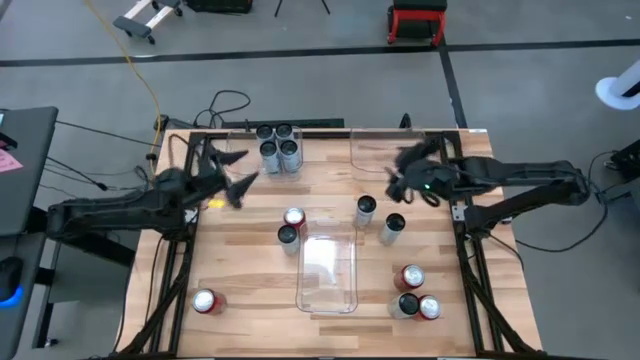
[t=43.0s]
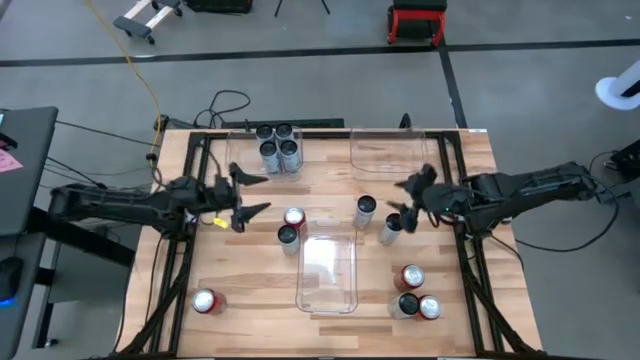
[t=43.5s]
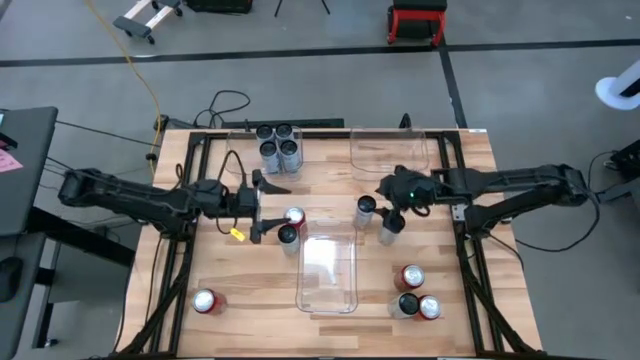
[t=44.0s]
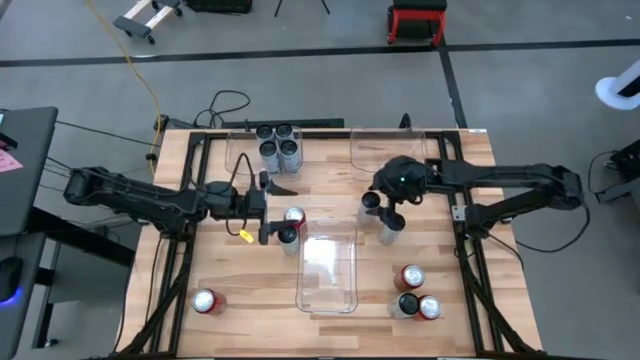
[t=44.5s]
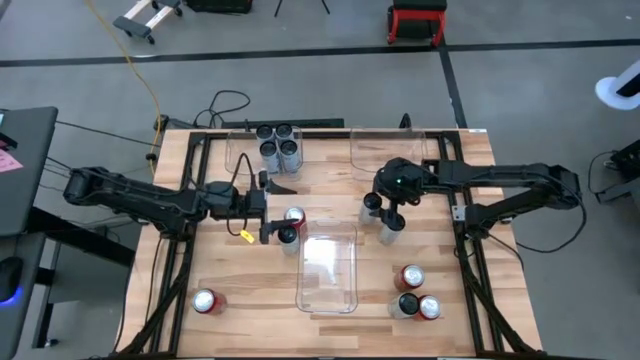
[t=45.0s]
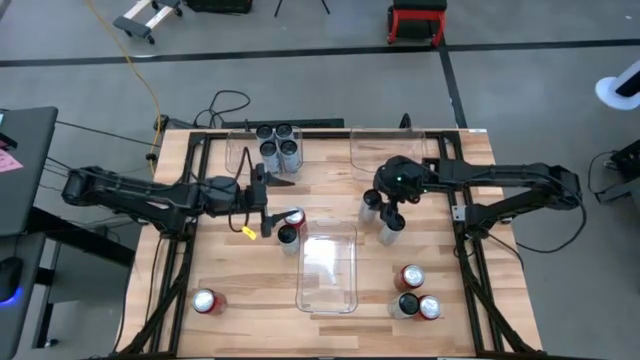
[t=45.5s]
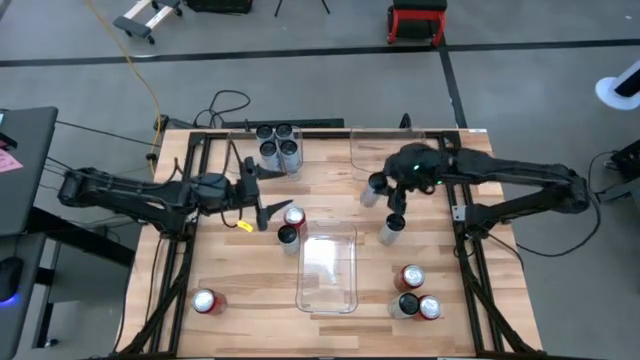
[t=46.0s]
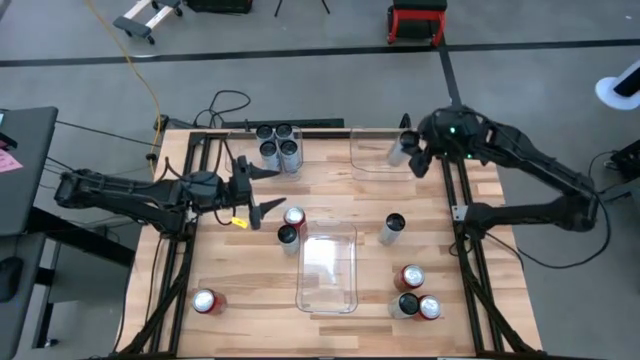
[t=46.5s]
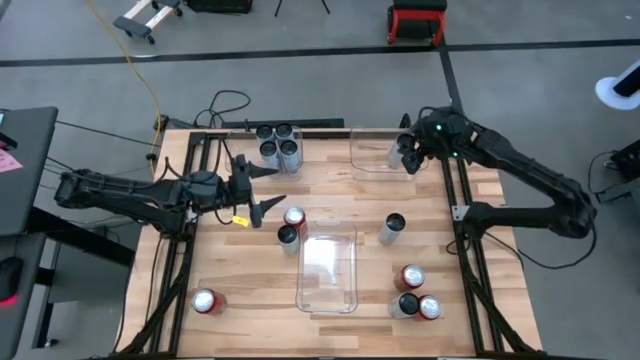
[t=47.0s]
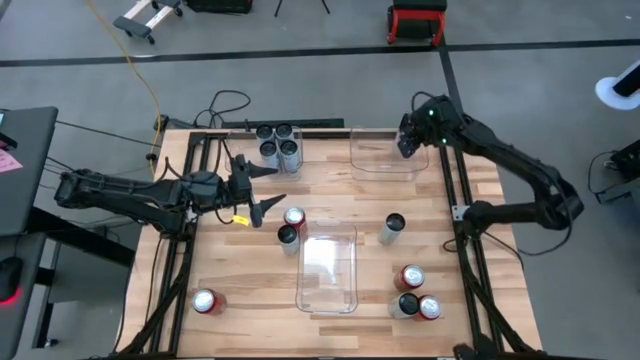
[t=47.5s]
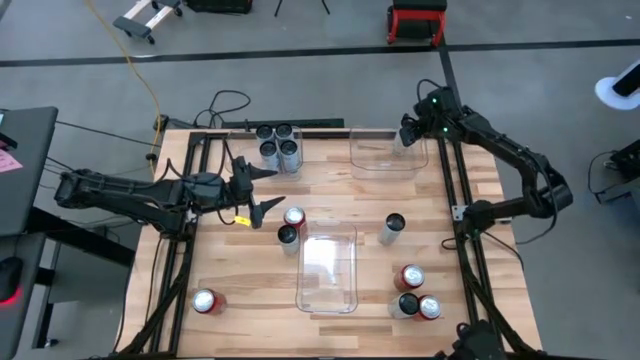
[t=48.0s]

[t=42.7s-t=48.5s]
Task: Sort soda cans
Put the white-yellow soda can into the top right transparent bin

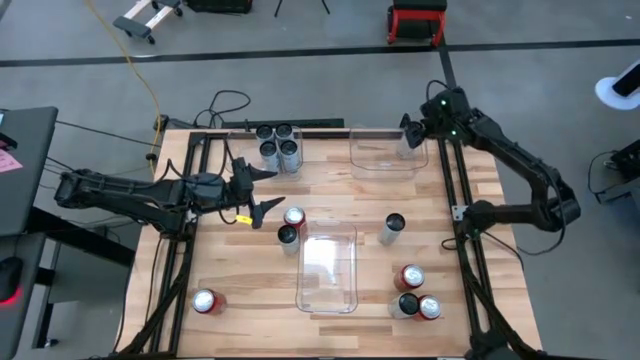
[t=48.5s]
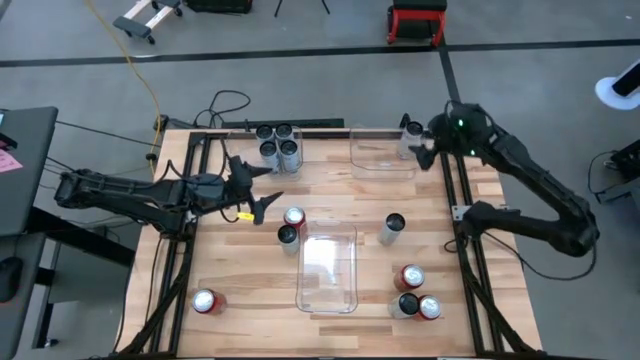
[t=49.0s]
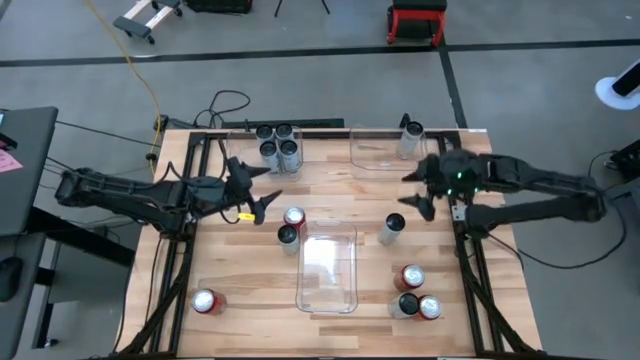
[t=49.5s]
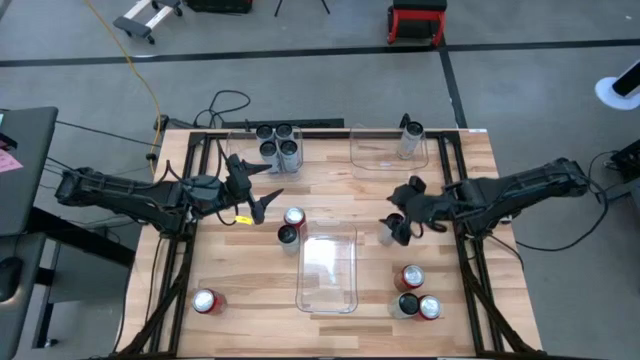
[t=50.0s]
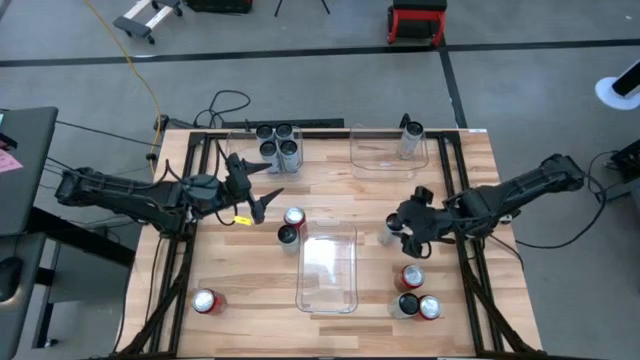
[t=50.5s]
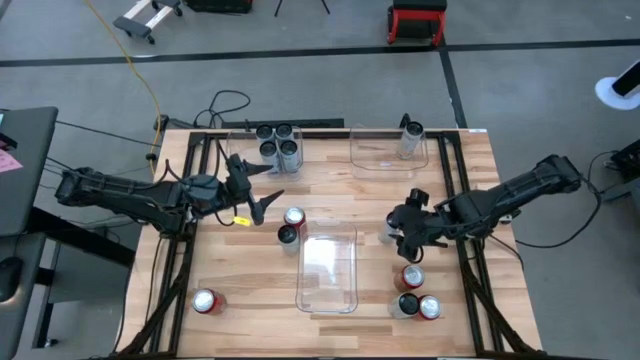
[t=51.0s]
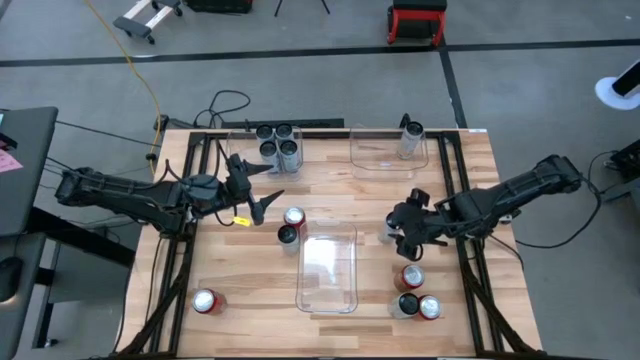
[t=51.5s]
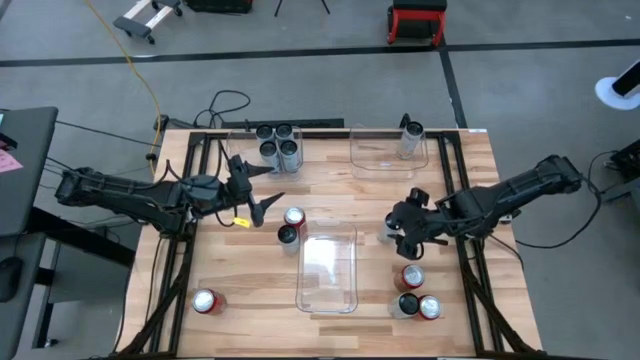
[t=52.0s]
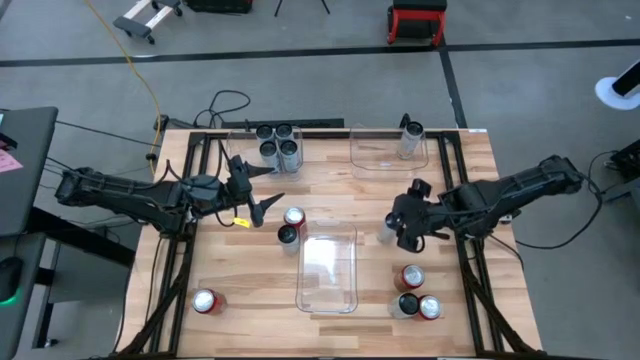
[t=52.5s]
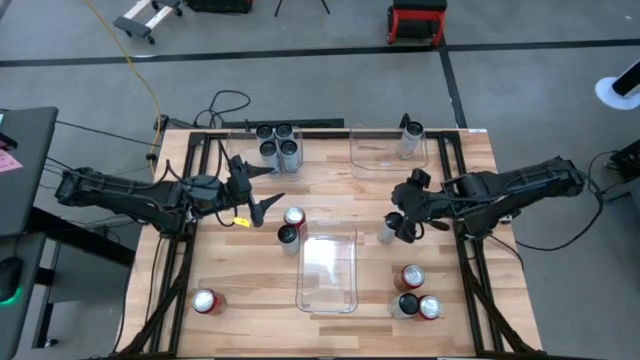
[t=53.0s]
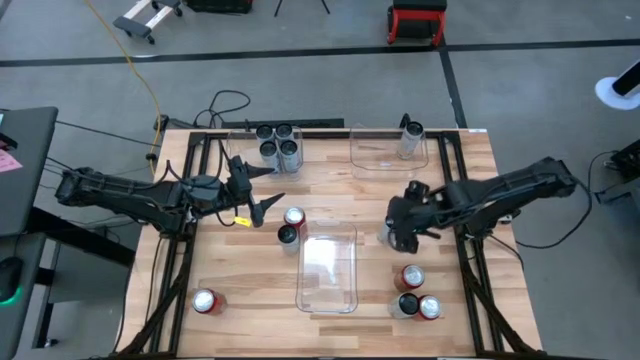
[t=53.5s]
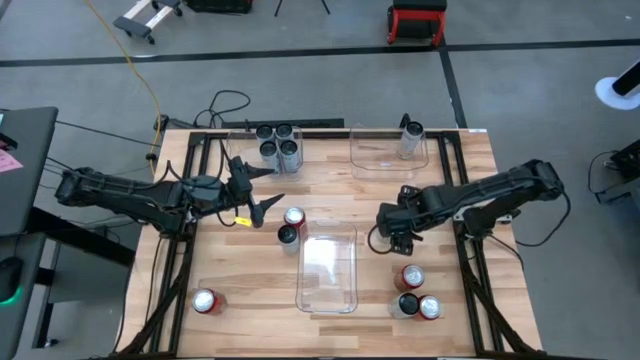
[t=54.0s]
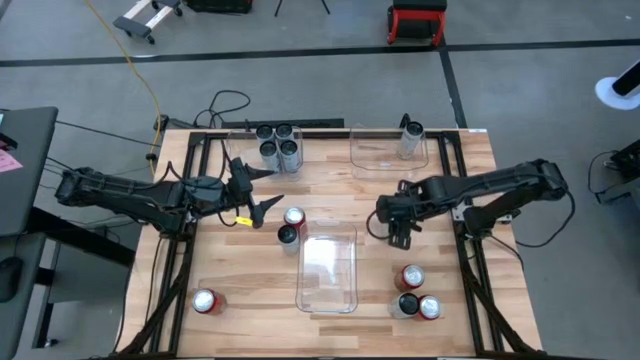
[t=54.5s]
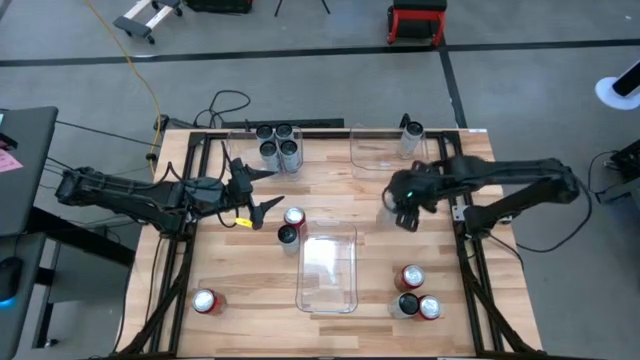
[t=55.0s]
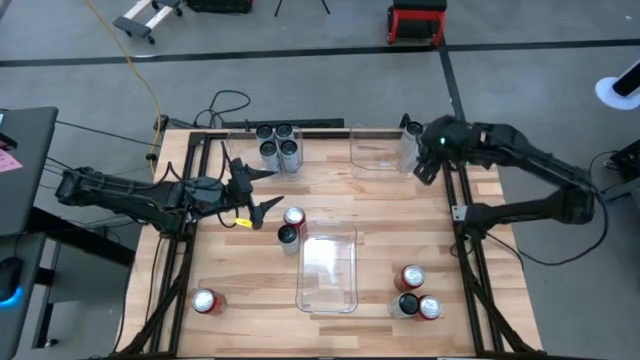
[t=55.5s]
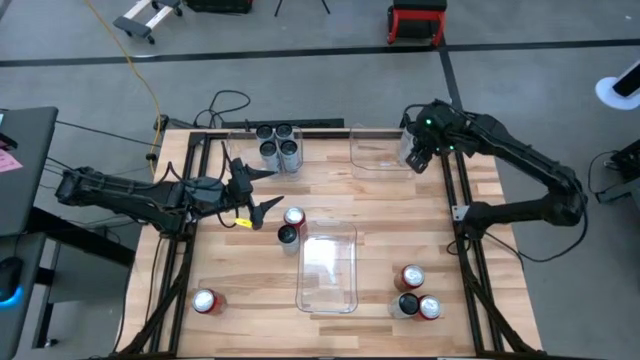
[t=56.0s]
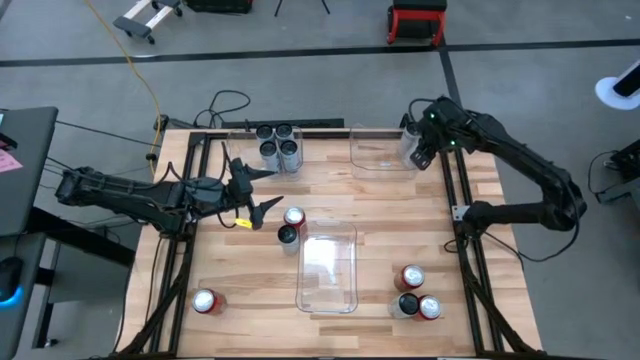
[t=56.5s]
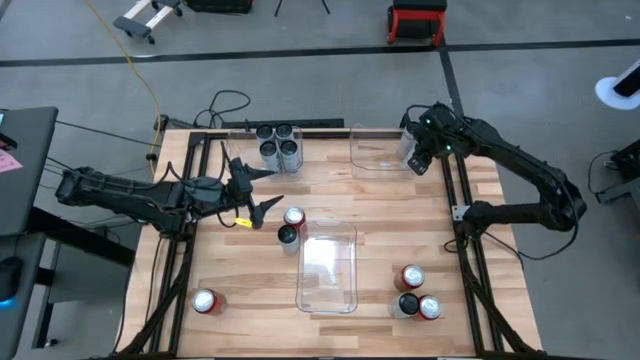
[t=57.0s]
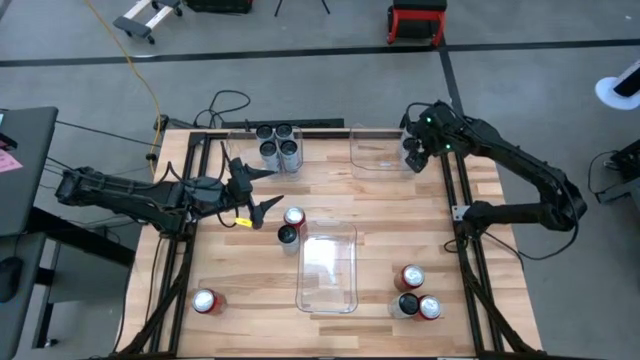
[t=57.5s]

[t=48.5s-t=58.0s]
Put the white-yellow soda can into the top right transparent bin

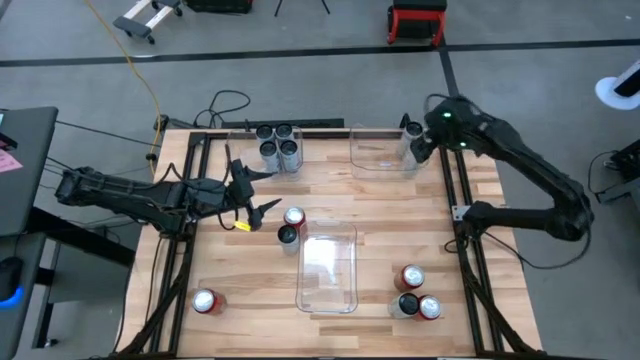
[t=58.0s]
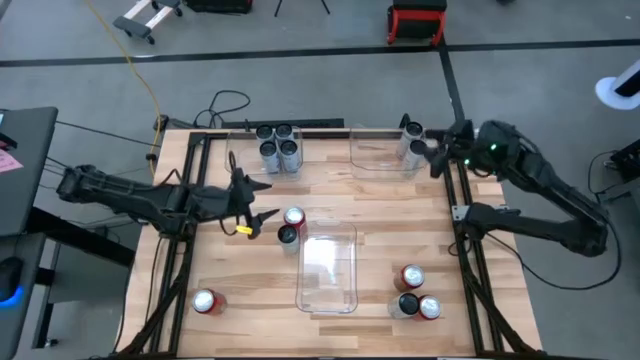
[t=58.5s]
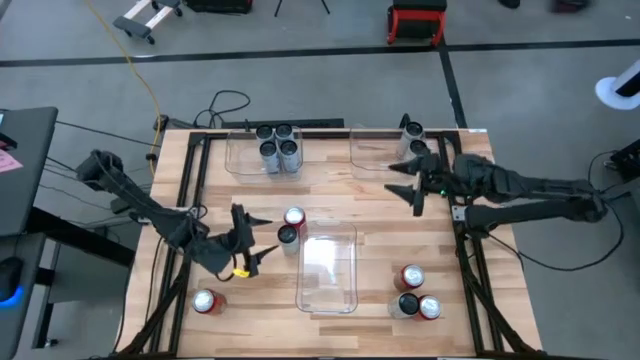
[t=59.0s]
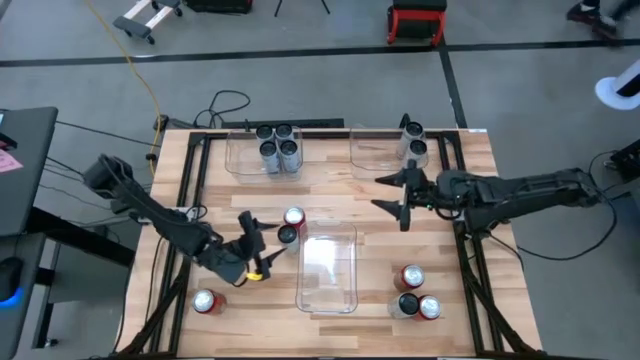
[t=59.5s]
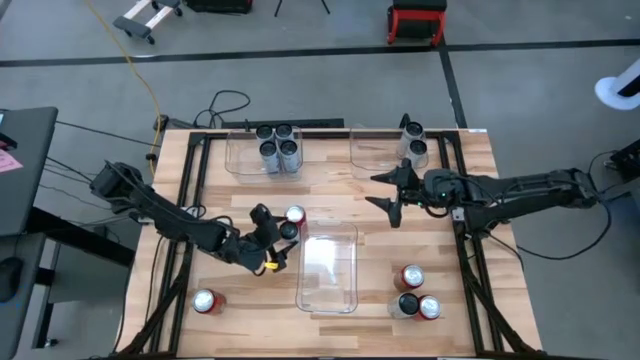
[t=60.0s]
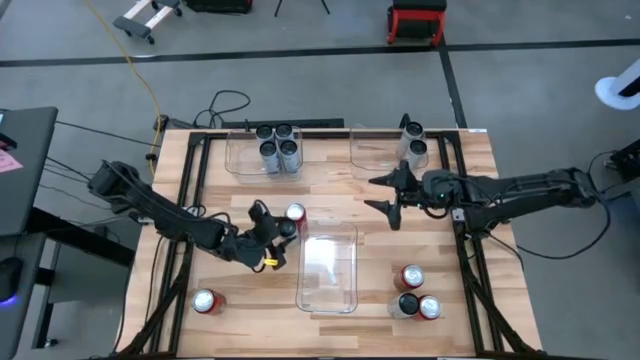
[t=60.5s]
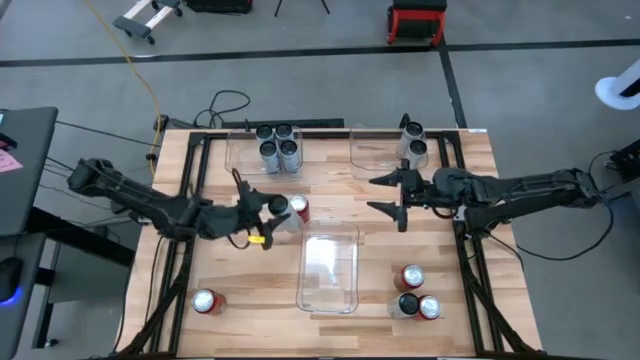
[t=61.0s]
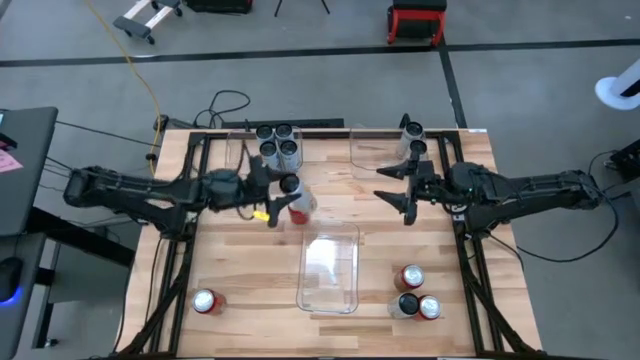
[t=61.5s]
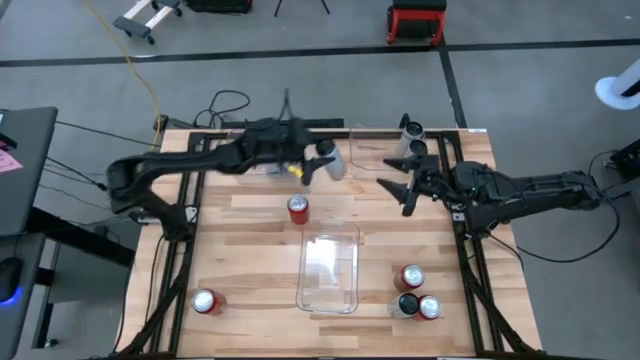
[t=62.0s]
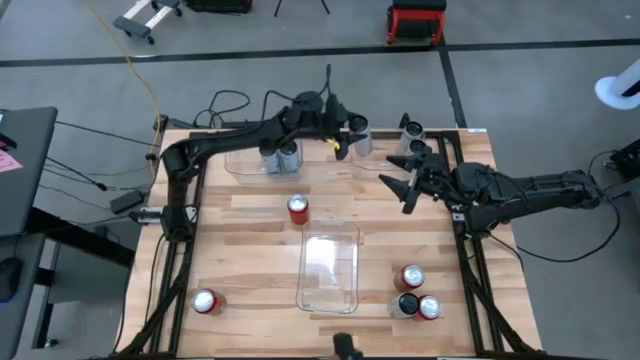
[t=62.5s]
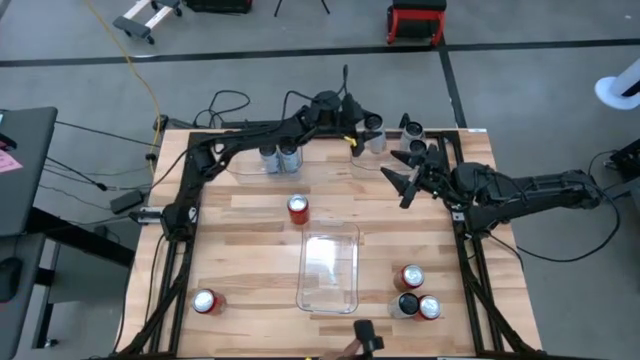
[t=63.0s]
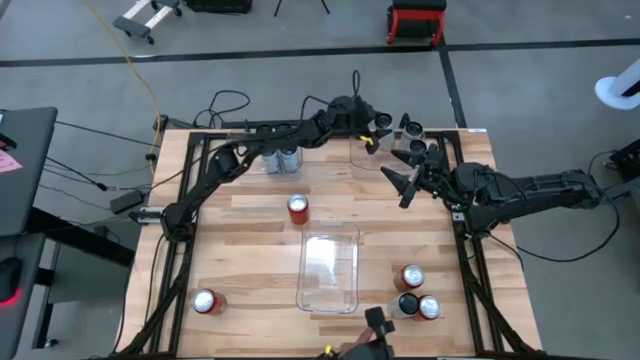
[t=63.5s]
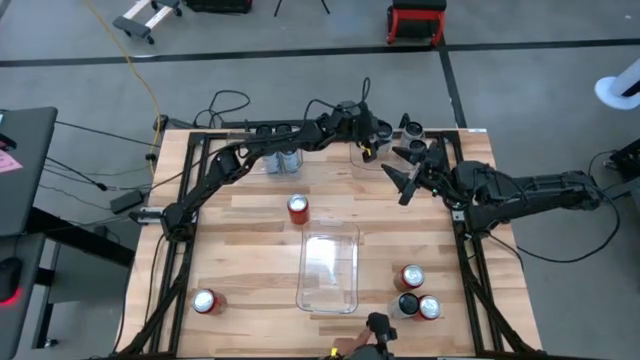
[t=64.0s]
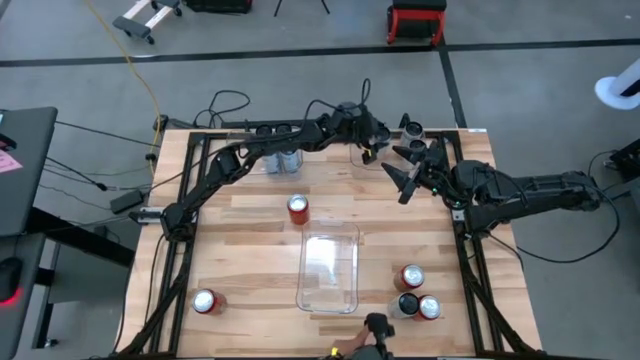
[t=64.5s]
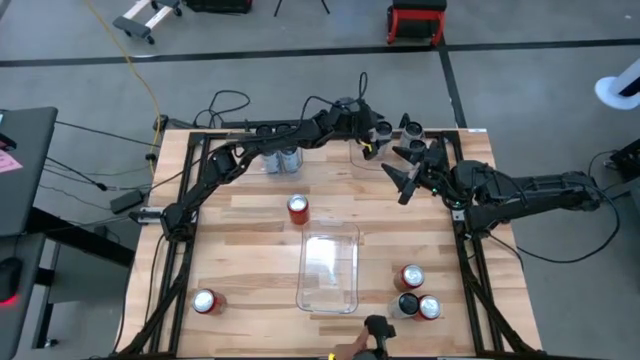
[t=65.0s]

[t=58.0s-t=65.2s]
Put the white-yellow soda can into the top right transparent bin
